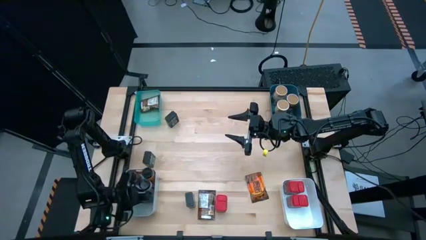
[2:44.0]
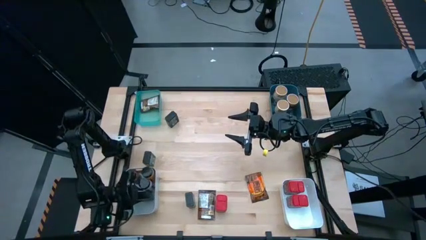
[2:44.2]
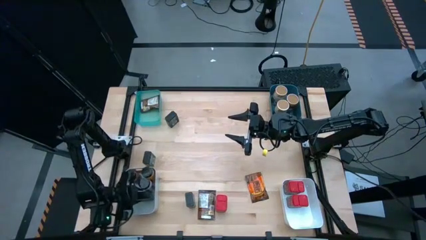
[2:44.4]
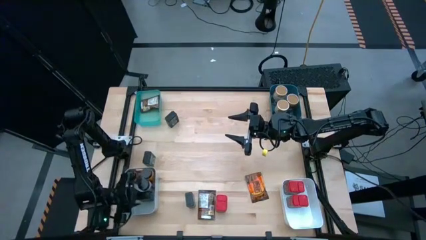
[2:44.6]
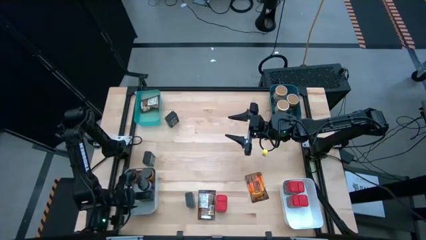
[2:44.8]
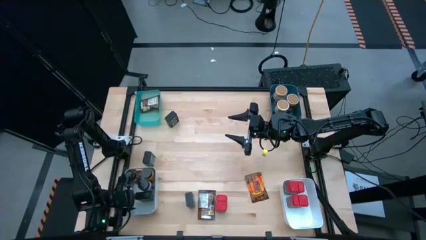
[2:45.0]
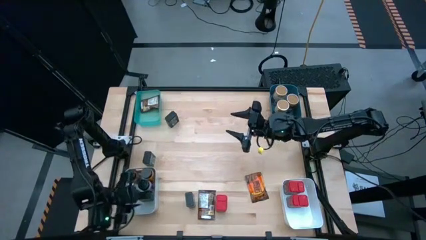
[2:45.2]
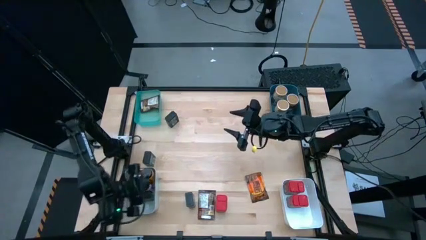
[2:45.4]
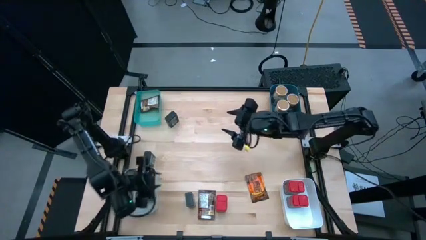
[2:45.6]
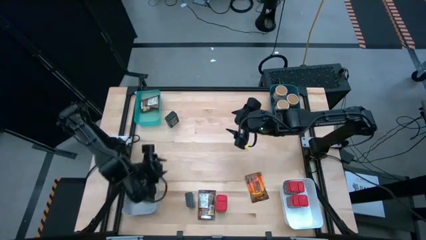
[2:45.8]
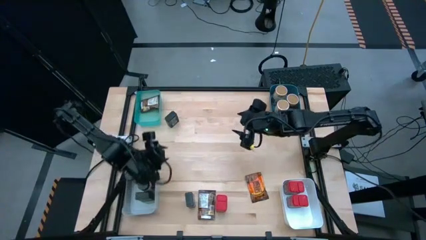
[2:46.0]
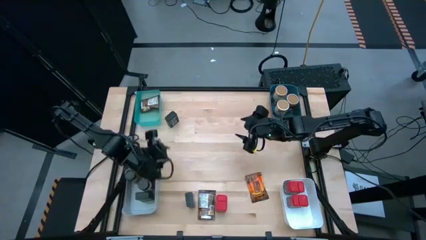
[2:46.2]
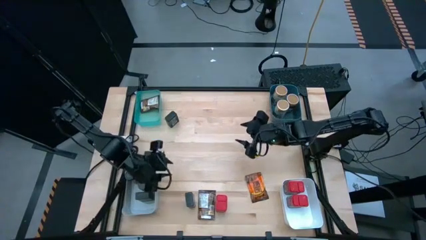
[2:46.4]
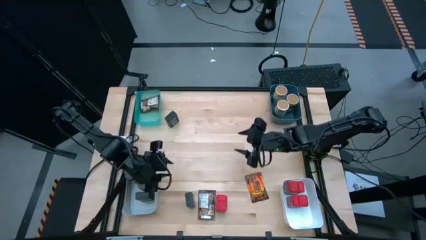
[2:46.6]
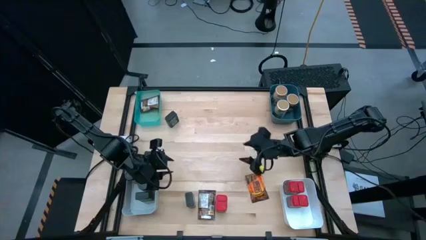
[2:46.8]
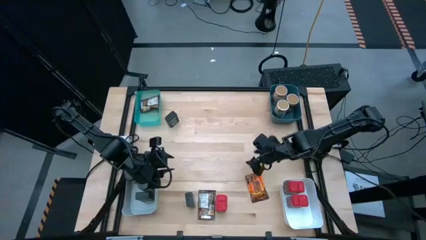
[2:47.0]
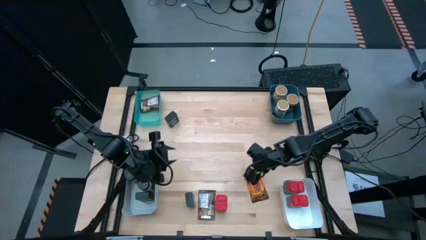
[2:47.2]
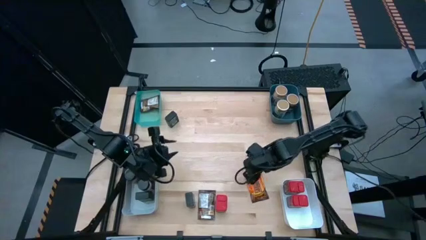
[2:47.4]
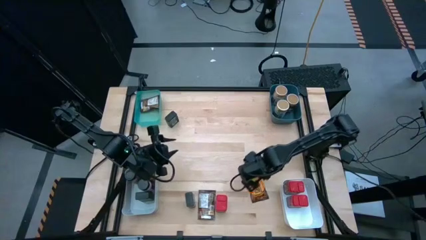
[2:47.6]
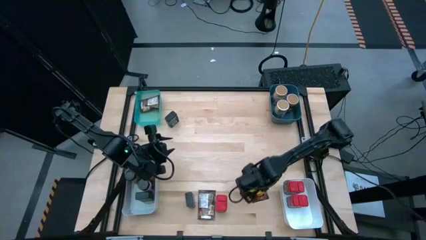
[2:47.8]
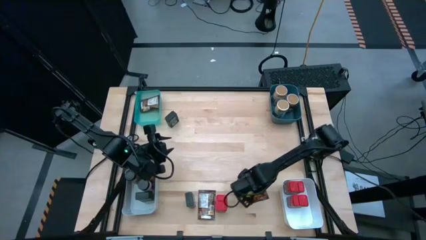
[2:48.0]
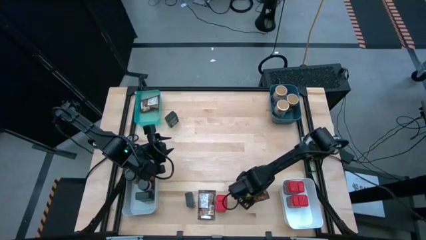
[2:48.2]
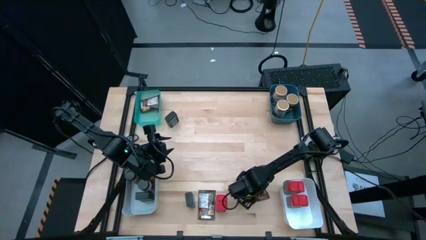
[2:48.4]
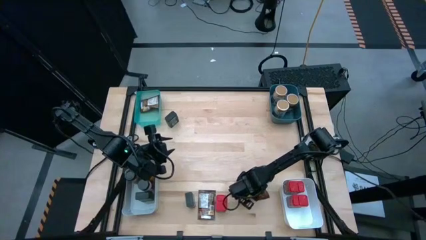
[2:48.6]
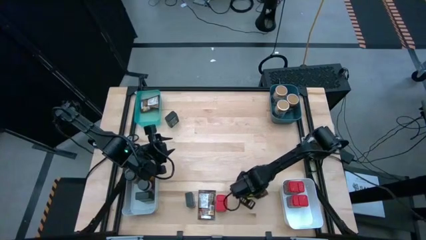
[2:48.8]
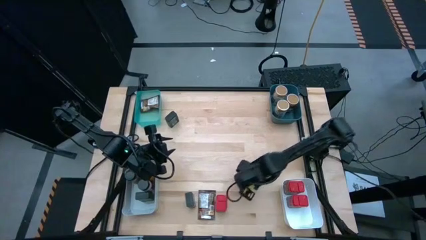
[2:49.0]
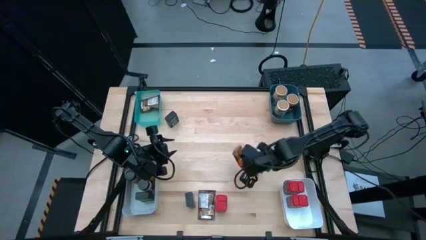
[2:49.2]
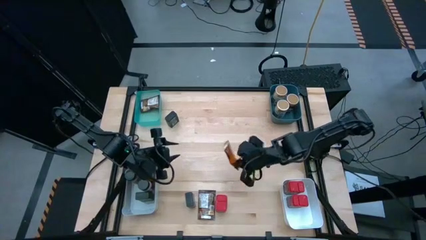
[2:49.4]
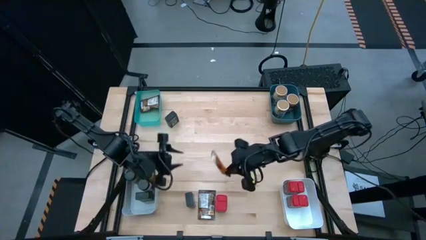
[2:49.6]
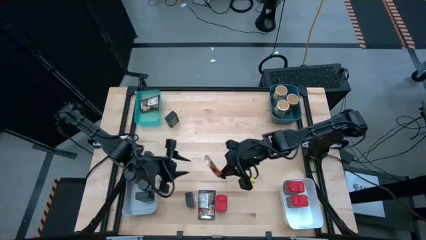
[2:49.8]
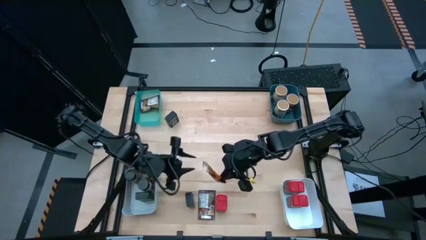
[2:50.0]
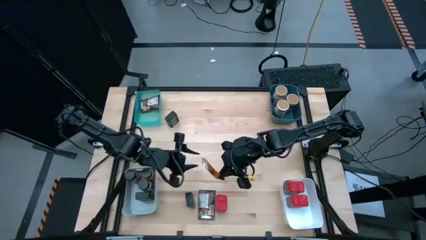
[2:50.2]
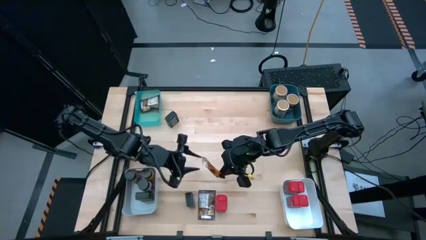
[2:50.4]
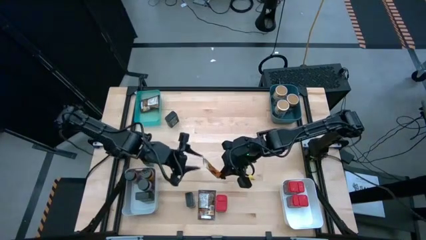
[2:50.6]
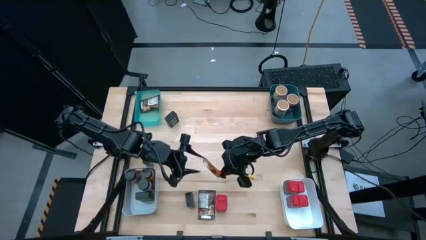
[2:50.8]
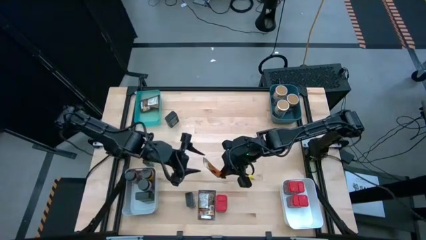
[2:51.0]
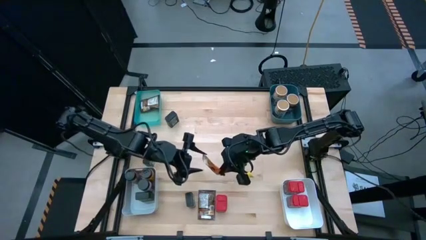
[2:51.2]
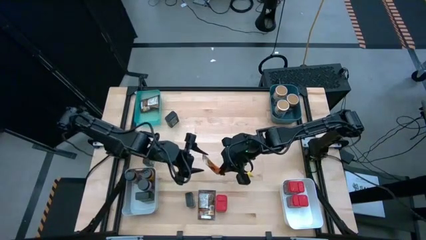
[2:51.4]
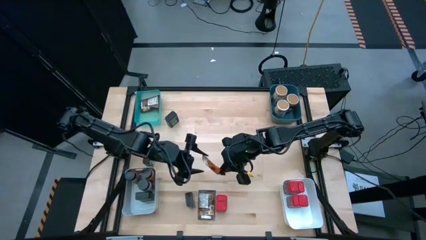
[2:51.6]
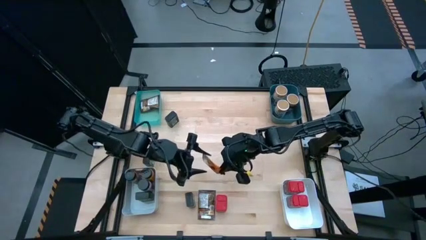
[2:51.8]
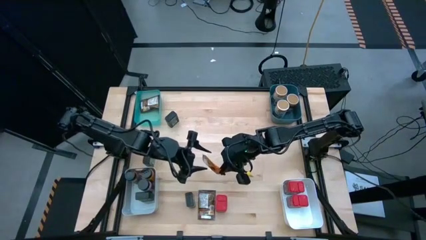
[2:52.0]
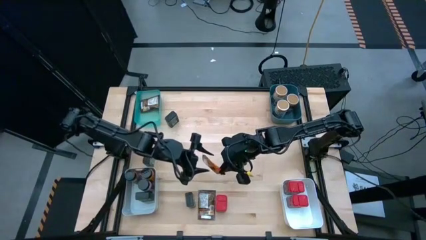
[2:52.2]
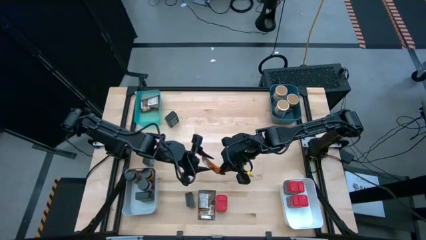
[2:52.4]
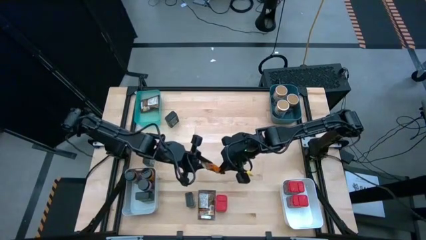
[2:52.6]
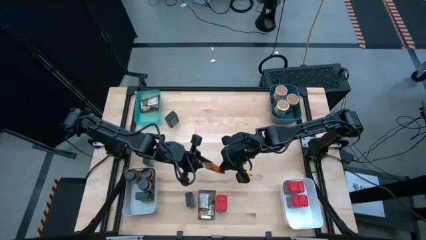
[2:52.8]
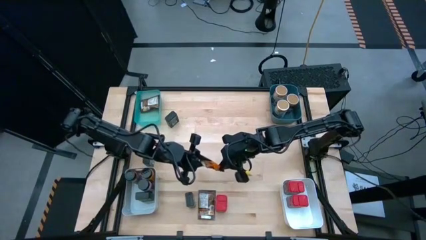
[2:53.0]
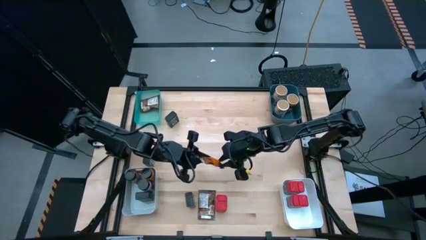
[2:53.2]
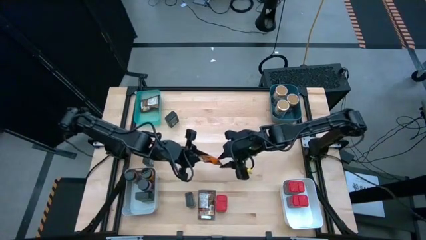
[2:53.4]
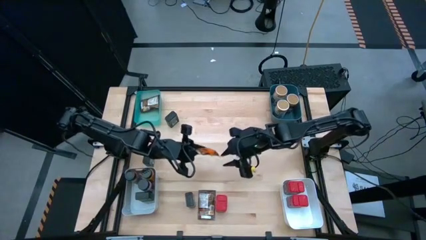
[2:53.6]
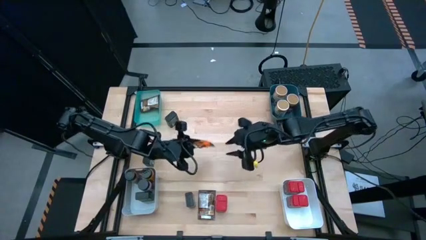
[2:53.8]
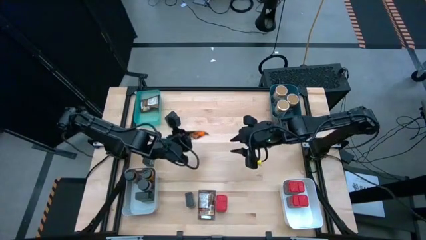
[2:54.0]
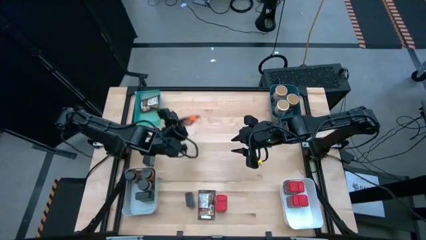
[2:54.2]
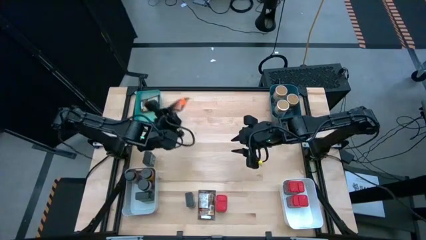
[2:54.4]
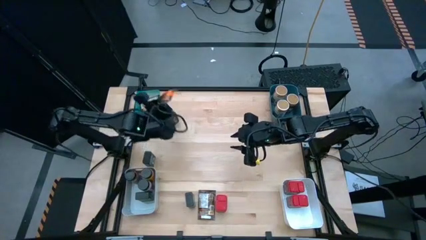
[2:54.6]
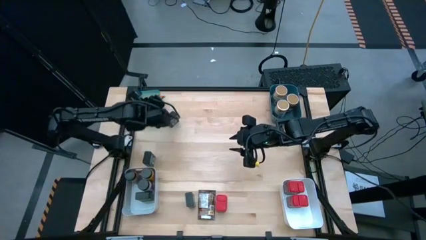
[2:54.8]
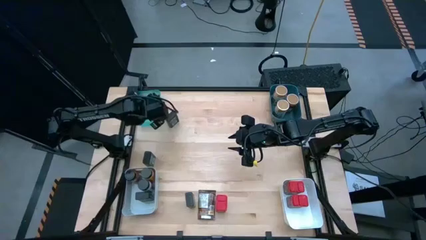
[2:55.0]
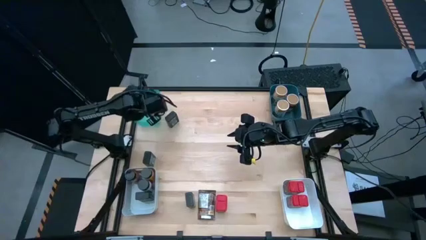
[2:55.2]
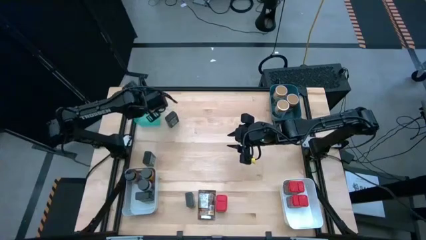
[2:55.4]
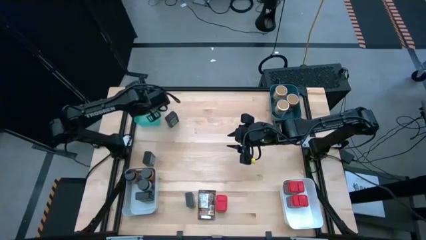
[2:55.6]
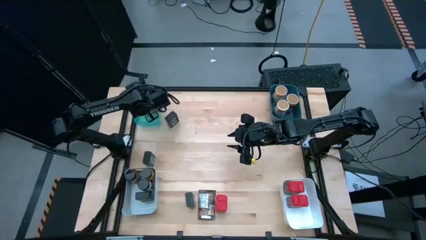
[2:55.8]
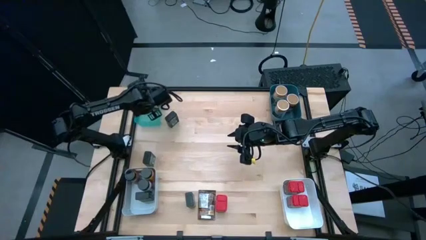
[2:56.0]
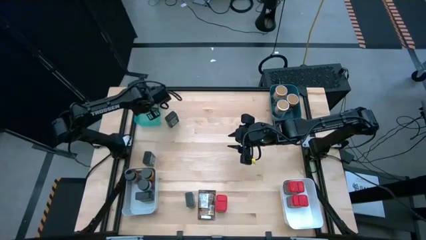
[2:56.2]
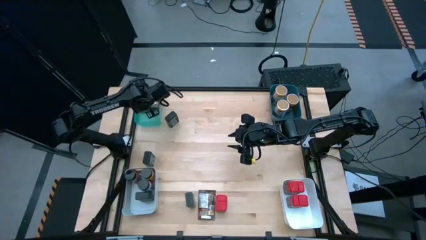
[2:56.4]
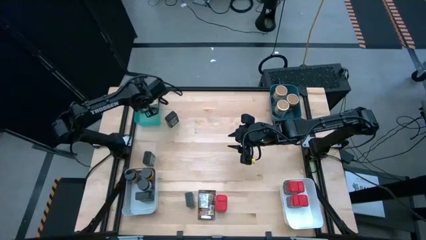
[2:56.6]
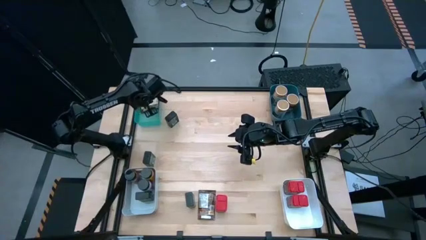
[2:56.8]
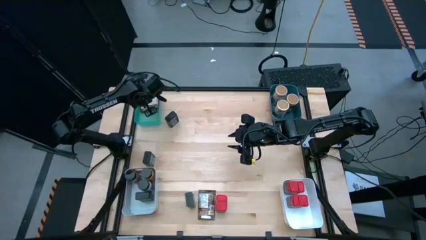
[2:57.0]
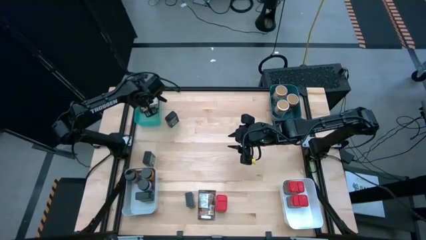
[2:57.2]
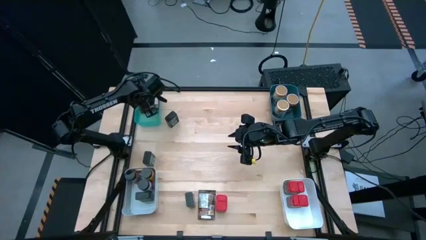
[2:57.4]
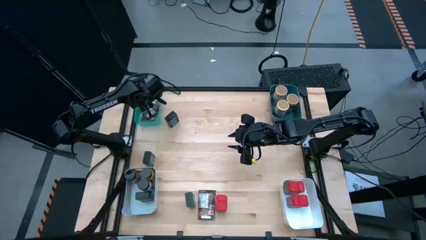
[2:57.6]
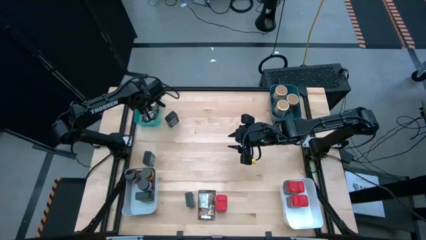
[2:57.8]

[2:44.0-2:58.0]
Task: Sort spices by type
Put the right brown seasoning pack into the light green bin

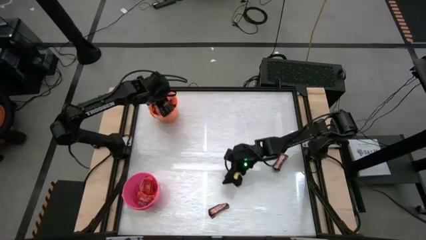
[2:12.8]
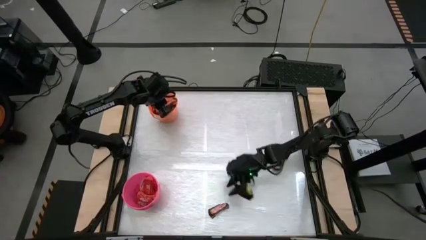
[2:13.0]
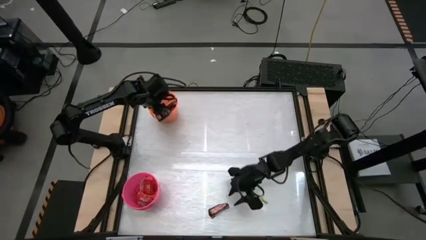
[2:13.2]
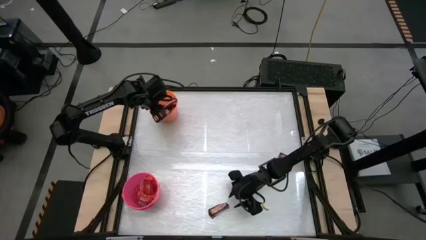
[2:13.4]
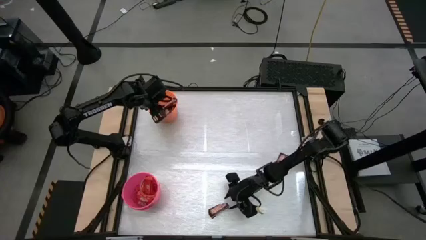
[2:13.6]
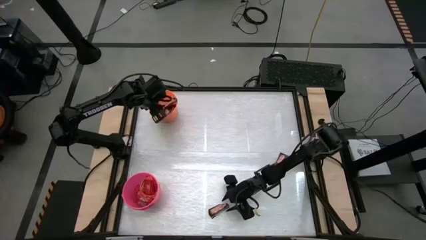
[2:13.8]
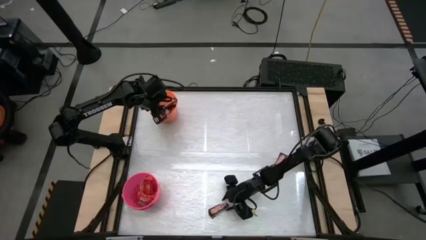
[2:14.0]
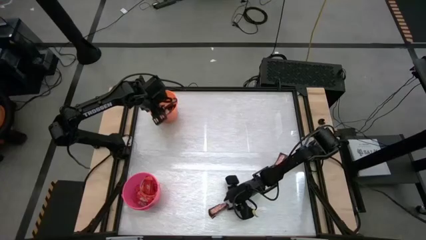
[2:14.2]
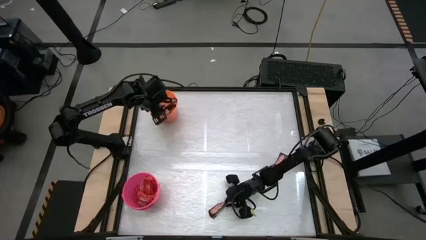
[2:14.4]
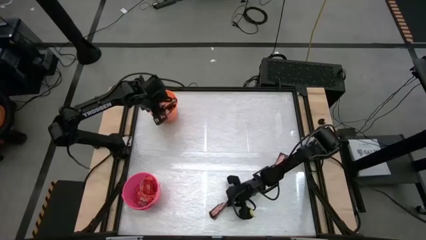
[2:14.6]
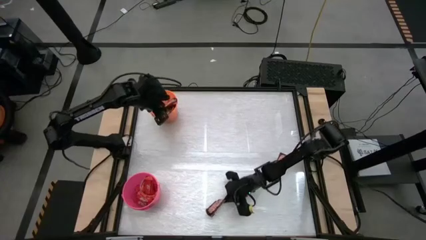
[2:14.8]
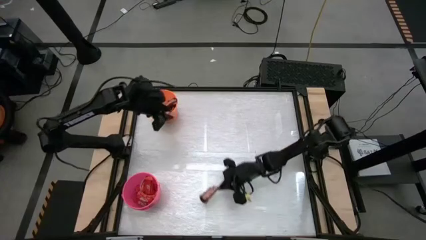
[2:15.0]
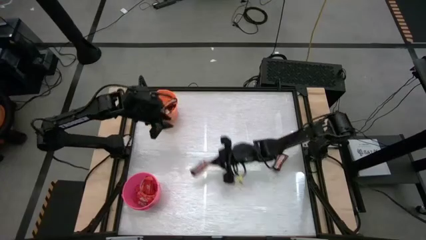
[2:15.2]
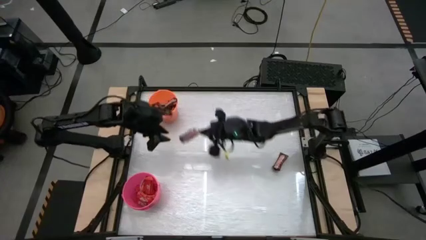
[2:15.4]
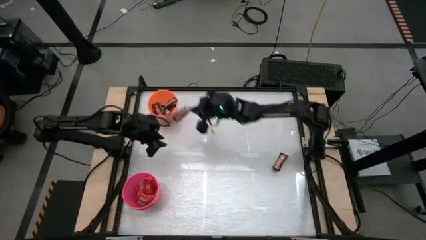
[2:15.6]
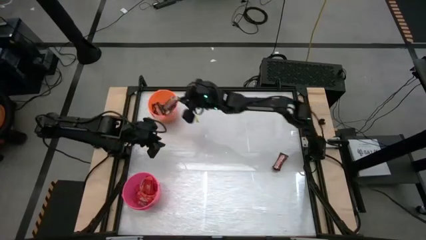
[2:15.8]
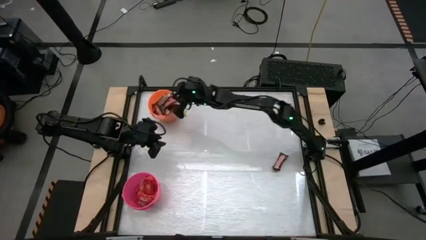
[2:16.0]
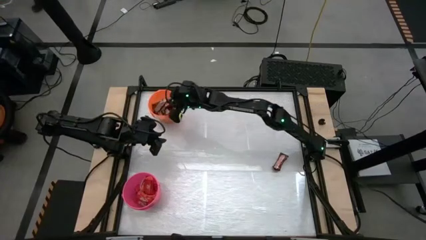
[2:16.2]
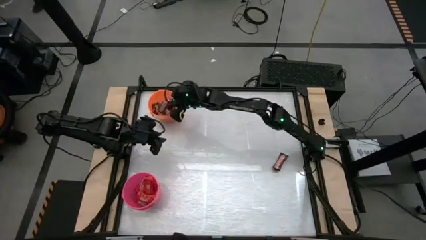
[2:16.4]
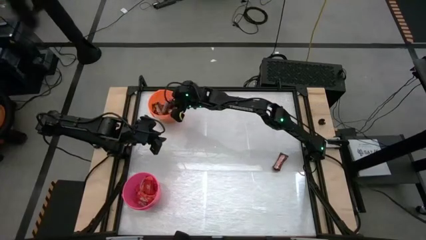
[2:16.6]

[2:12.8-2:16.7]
Task: Sort candy by brand, put in halloween buckets
Put the brown chocolate bar into the orange bucket
